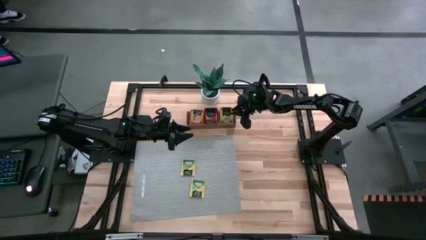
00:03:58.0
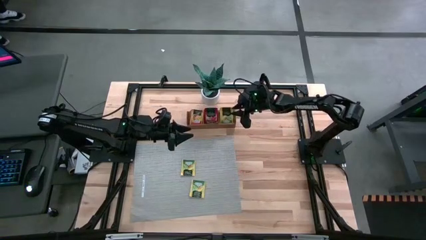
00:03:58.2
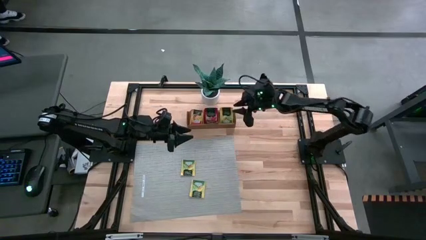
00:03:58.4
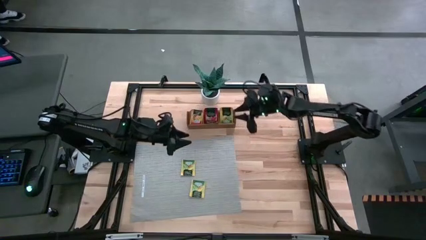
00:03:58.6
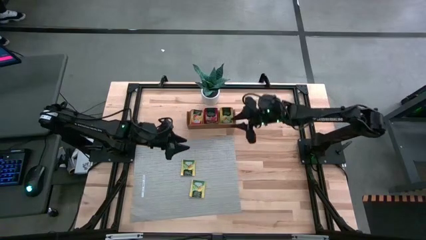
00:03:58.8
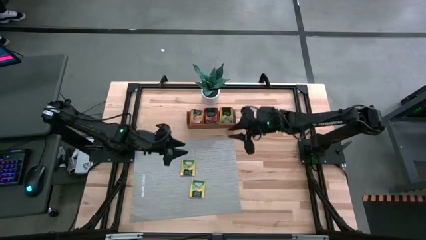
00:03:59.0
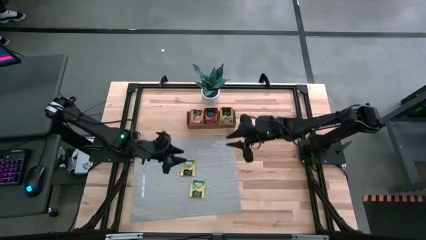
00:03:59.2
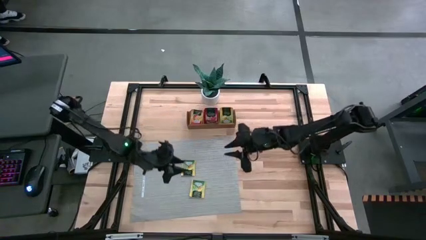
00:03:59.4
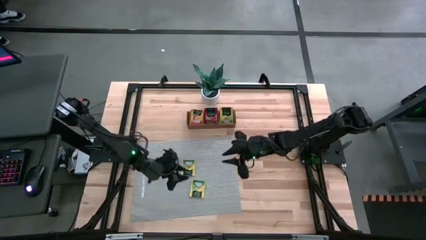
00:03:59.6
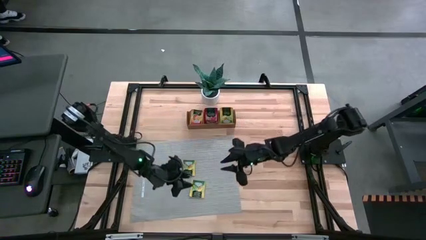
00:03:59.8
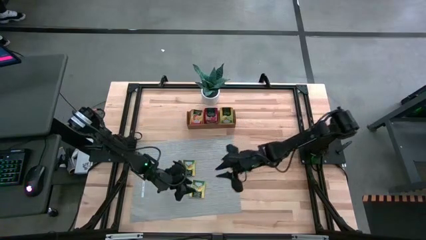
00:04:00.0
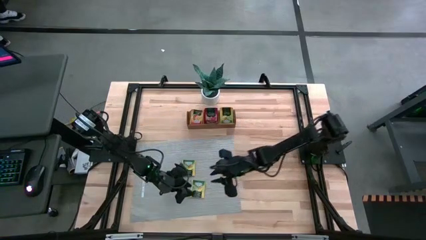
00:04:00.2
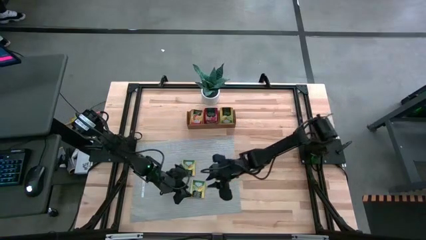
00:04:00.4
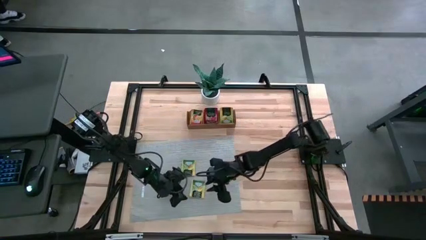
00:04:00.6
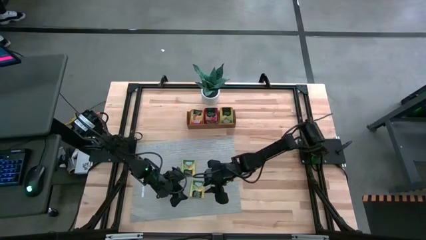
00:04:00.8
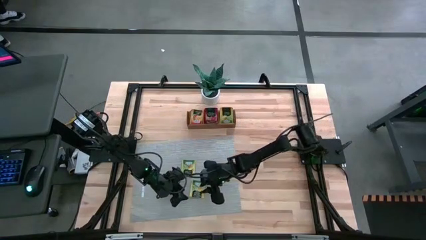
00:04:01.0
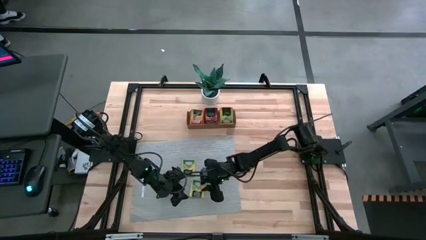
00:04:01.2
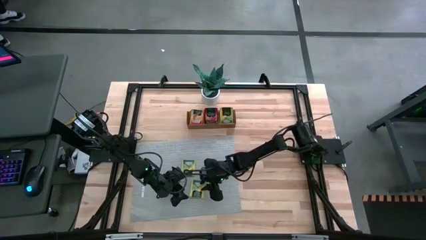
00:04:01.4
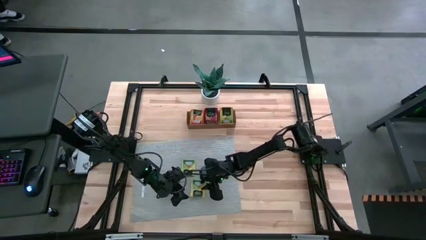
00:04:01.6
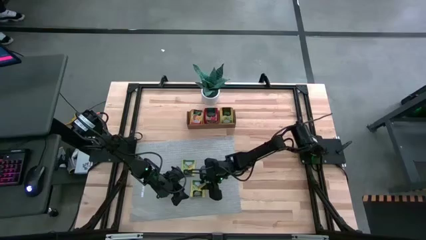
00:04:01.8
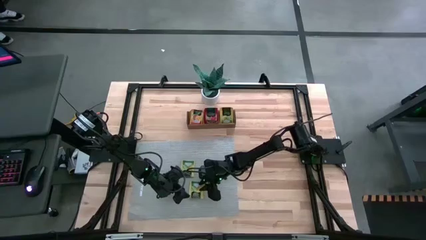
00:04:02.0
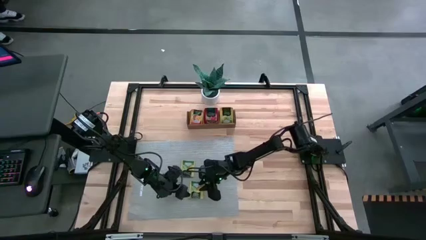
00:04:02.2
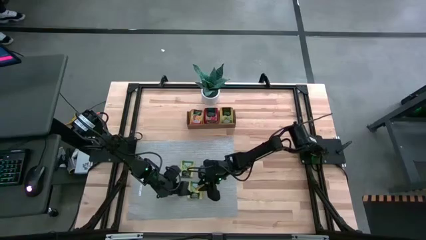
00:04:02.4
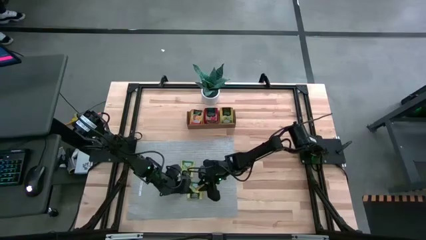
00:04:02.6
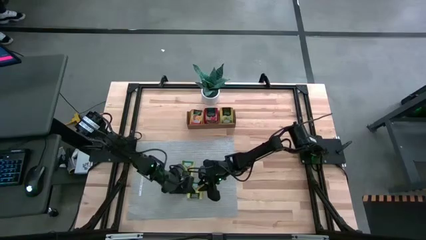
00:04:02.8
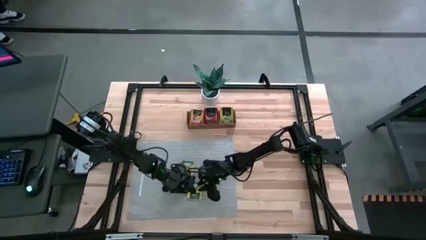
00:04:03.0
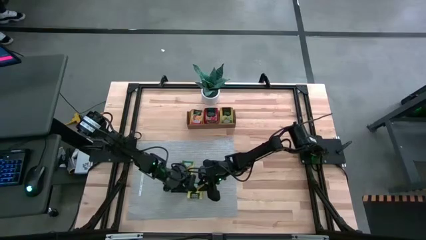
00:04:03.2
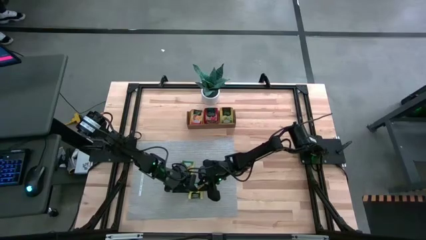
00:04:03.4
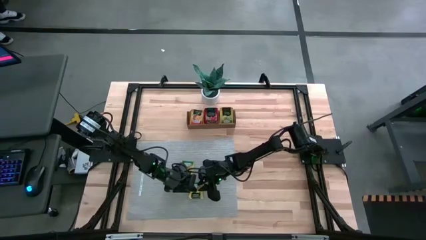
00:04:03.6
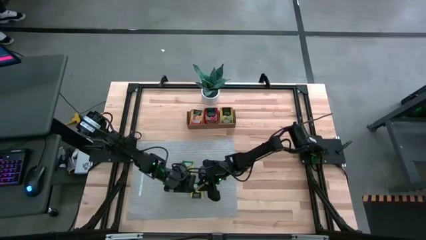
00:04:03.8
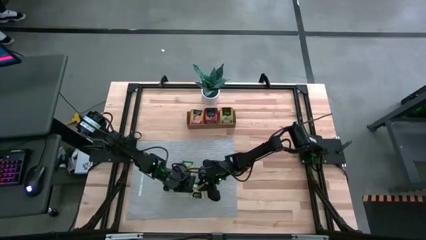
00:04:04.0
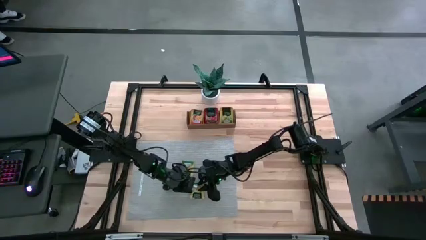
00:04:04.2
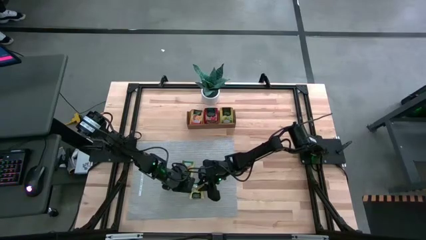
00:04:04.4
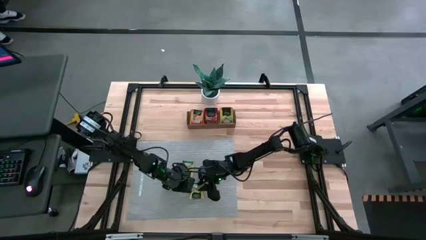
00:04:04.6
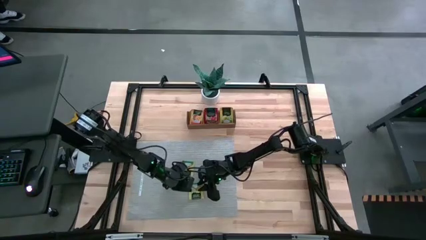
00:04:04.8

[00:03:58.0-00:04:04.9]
Task: Pick & Place Tea
Put the yellow tea bag into the right section of the wooden organizer

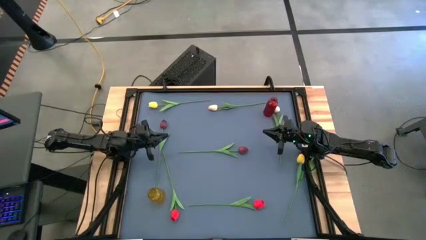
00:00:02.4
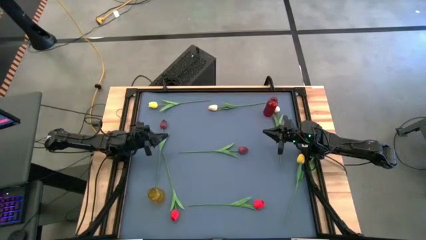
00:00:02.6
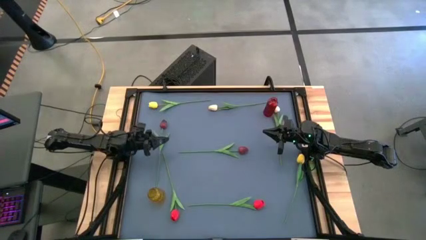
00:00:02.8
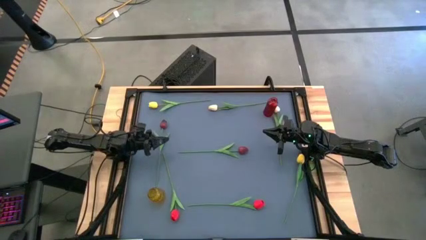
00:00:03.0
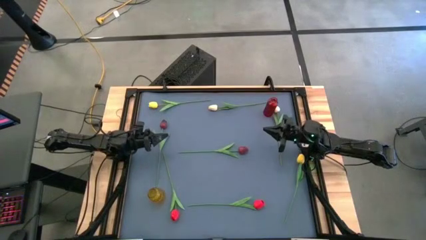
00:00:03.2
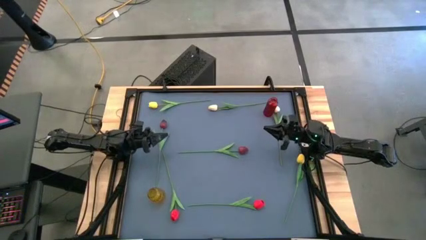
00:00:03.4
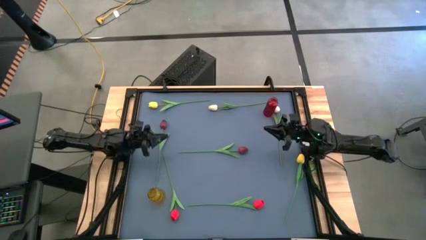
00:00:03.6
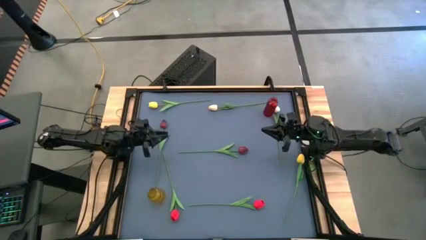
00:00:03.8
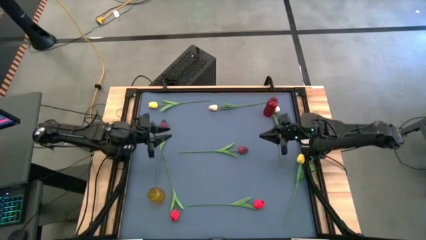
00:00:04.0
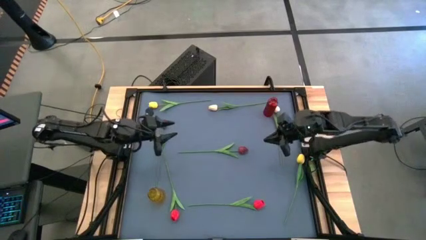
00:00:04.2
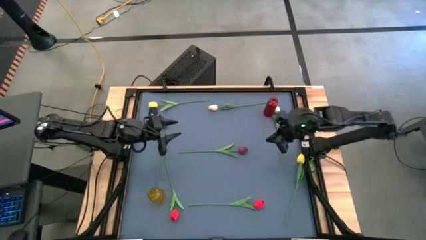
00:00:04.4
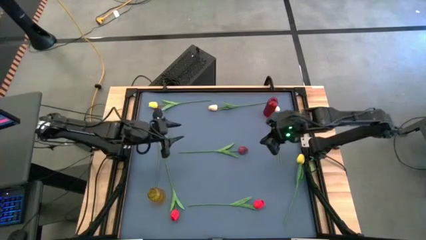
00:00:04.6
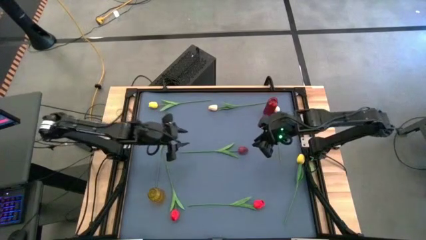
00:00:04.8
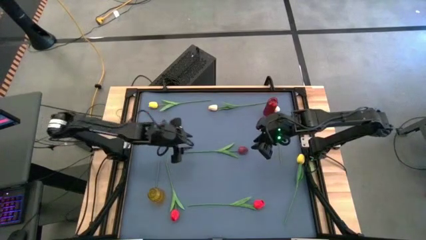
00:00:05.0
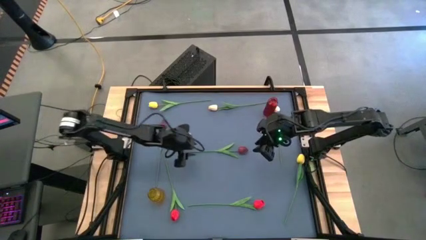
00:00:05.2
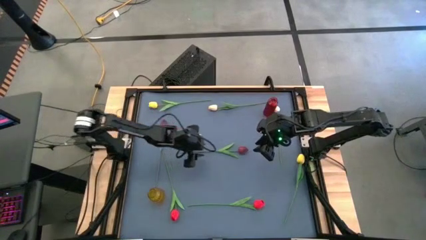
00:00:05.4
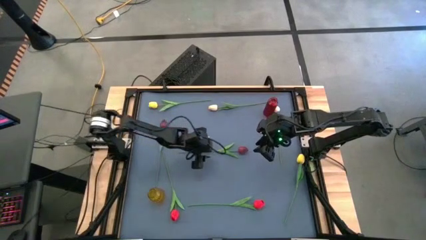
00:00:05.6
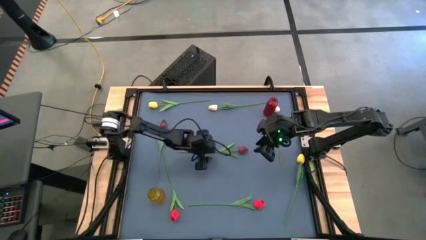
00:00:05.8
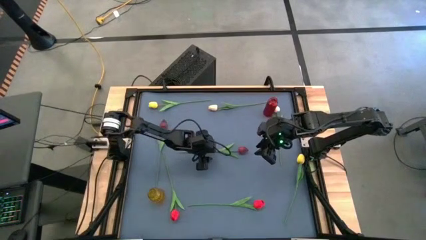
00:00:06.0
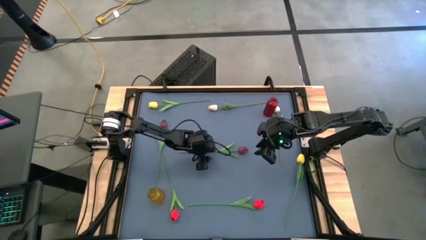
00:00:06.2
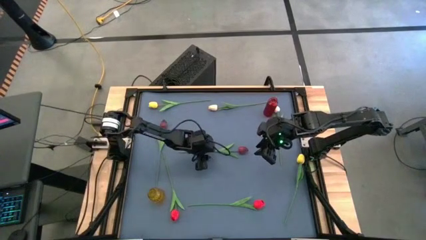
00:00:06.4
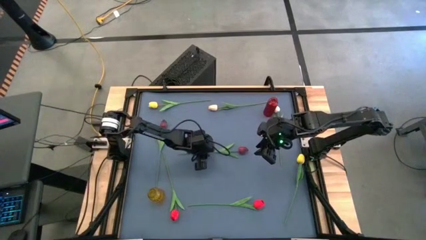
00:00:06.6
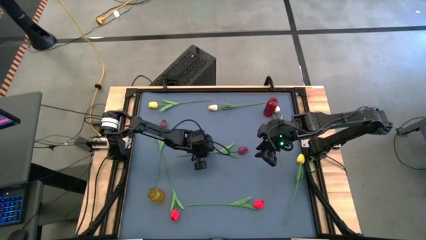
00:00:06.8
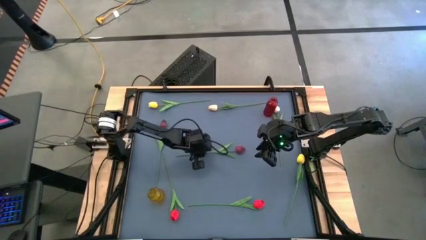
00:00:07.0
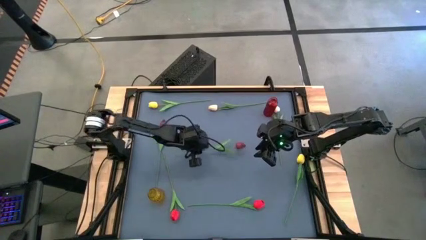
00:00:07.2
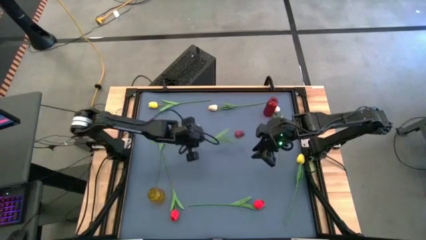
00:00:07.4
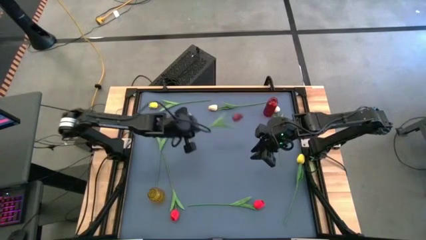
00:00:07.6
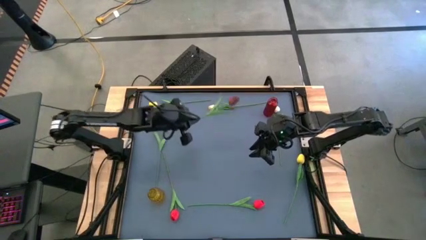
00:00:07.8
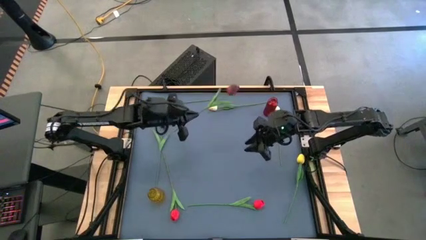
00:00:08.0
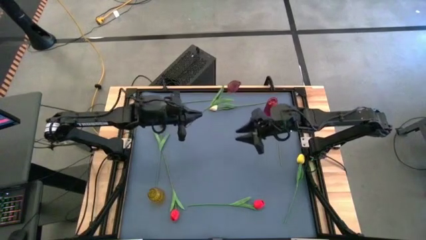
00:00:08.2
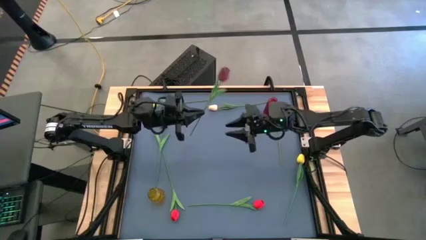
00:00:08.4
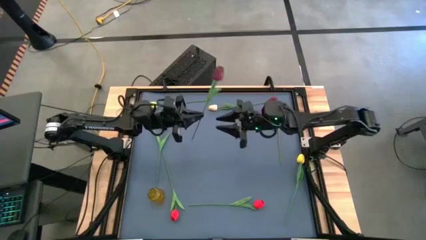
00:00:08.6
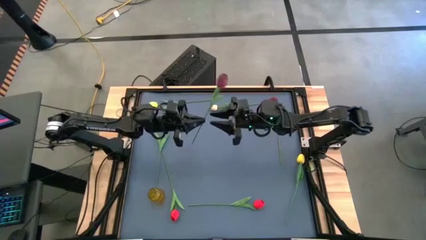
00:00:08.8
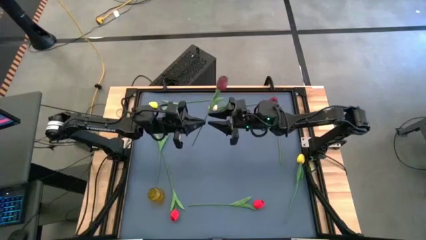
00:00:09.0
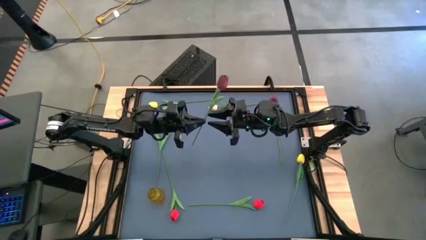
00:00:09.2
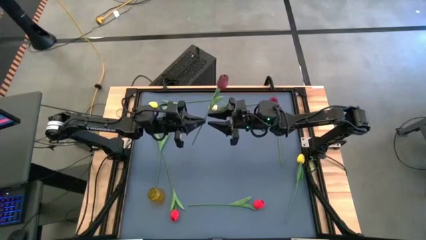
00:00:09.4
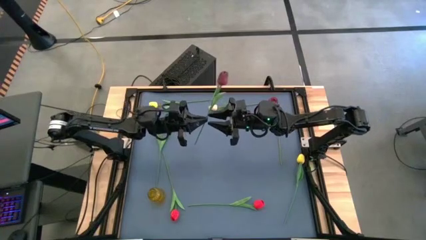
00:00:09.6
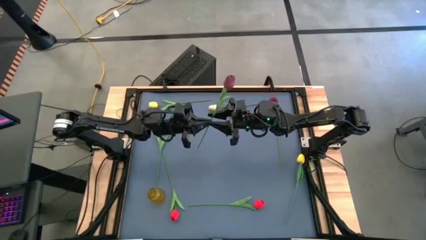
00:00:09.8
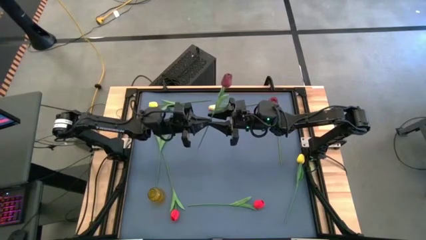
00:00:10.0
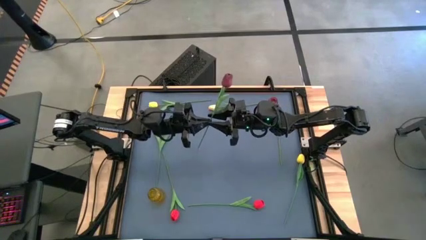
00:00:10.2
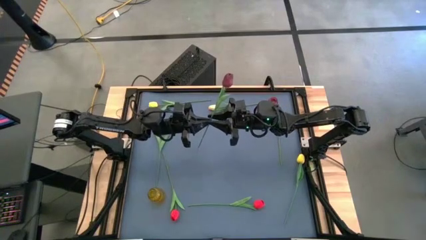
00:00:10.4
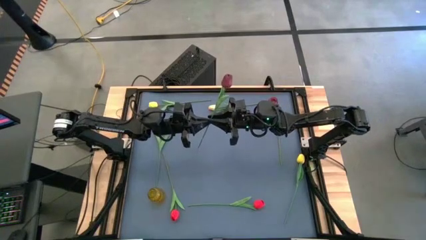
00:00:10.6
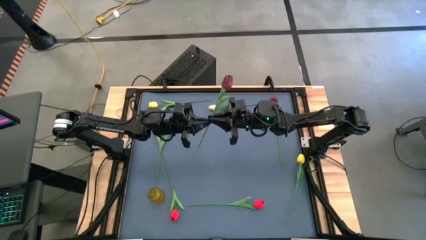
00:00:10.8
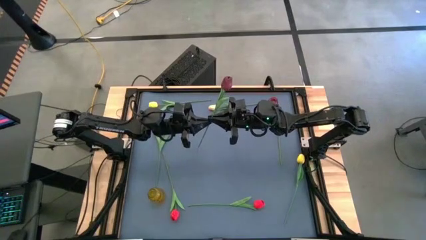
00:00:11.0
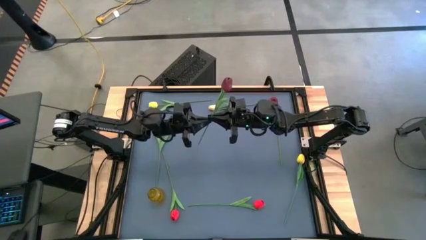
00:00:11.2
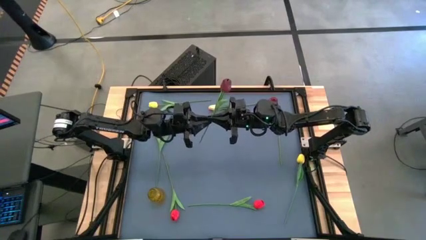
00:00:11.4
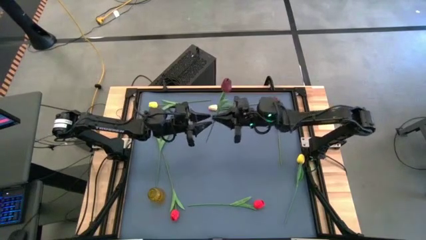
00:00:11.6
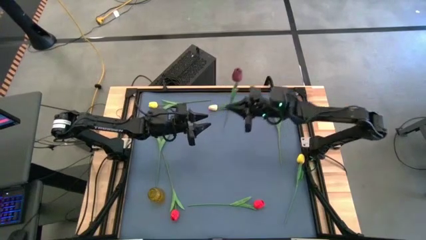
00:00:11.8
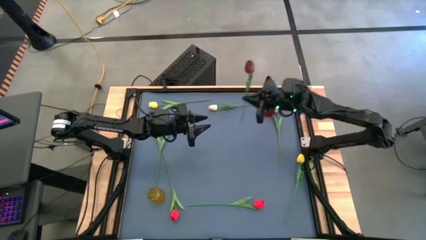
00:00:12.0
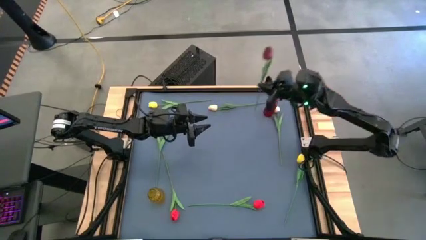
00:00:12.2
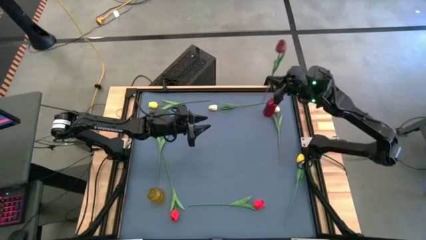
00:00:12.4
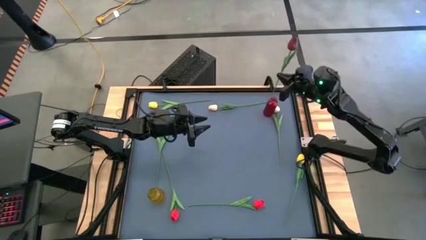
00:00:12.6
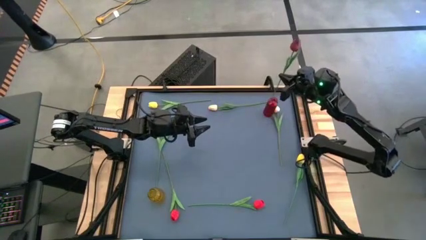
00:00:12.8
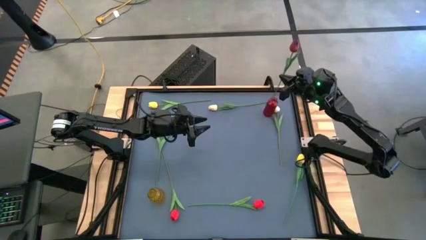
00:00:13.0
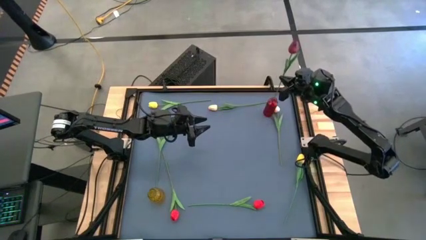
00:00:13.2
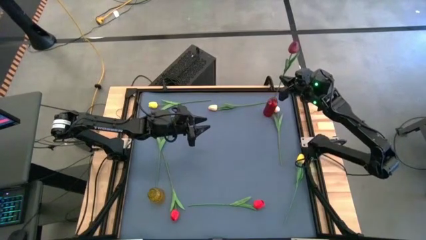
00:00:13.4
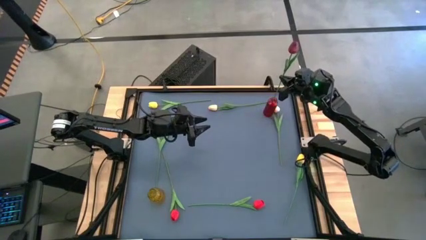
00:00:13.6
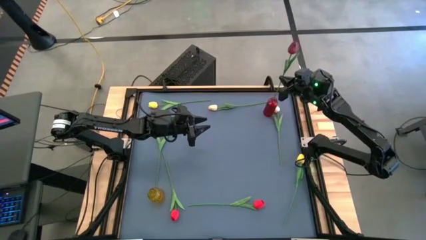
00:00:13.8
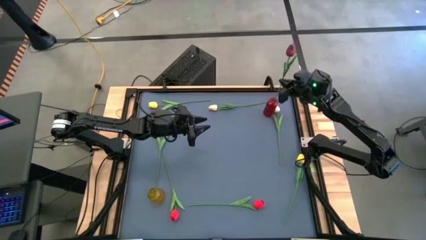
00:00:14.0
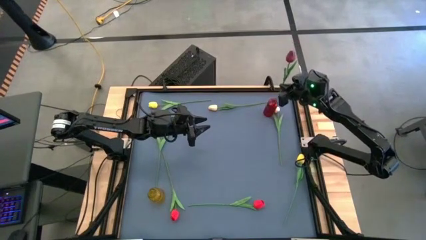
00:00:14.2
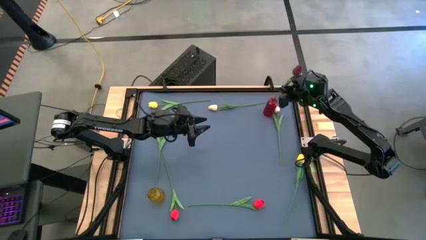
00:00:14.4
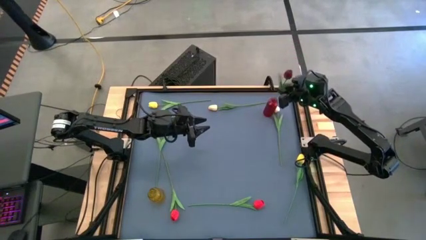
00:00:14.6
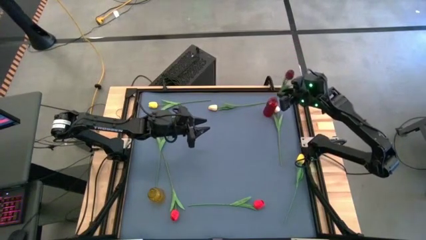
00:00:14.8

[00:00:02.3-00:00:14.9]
Task: Sort flowers into vase by color
Put the right dark red flower into the red vase
